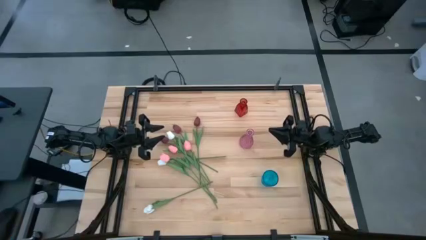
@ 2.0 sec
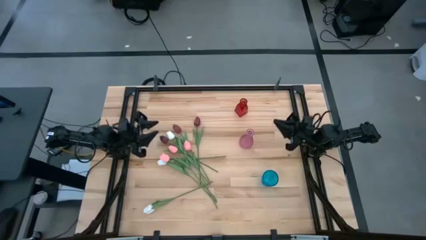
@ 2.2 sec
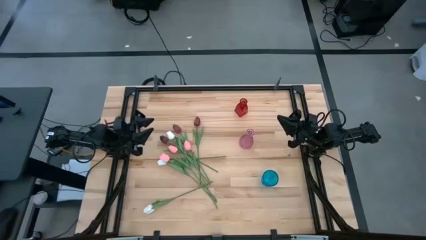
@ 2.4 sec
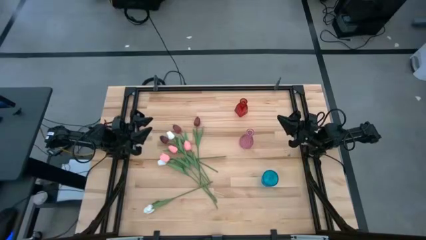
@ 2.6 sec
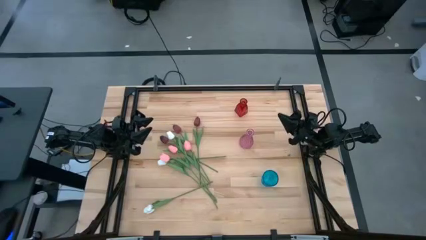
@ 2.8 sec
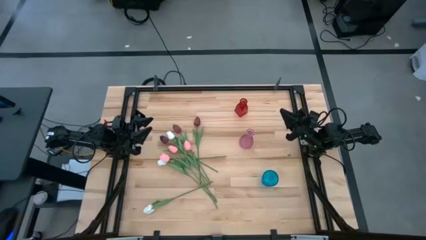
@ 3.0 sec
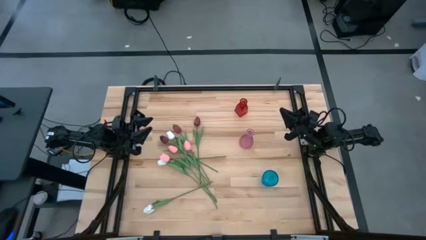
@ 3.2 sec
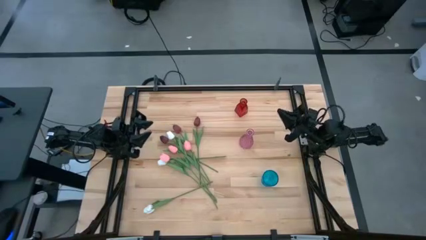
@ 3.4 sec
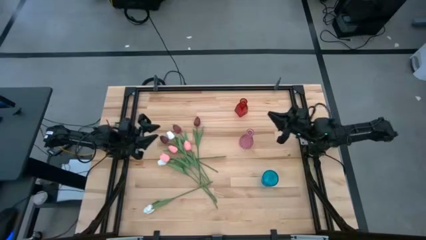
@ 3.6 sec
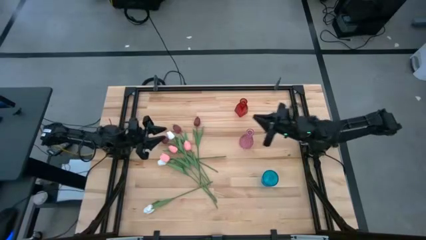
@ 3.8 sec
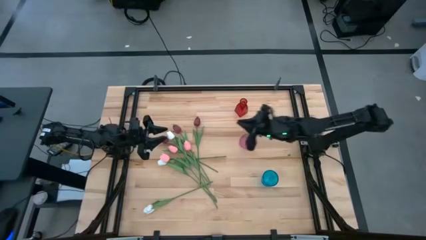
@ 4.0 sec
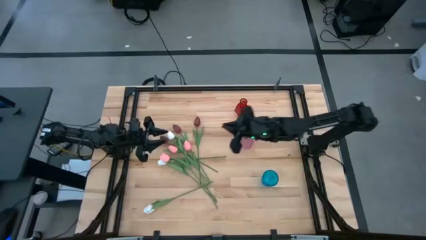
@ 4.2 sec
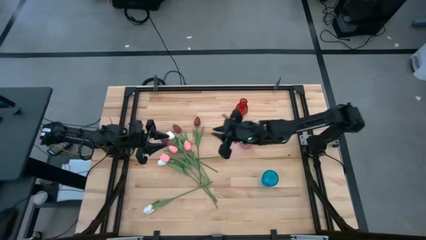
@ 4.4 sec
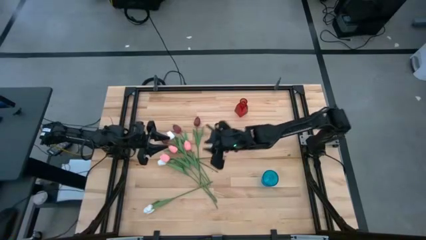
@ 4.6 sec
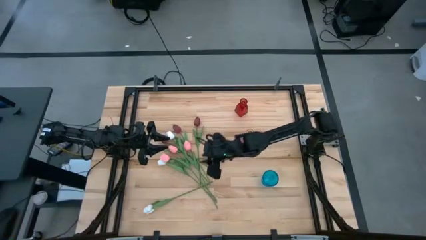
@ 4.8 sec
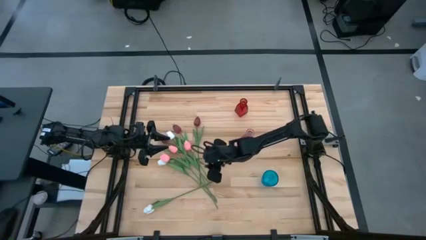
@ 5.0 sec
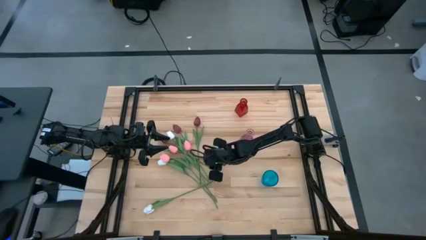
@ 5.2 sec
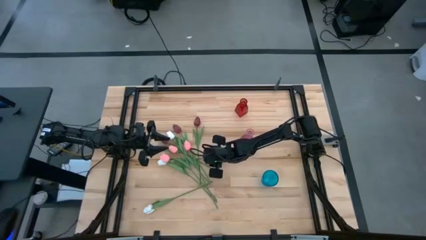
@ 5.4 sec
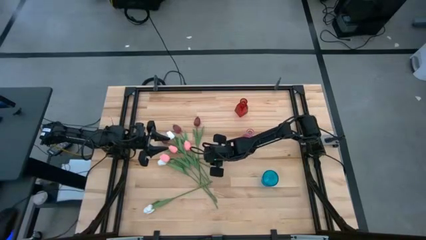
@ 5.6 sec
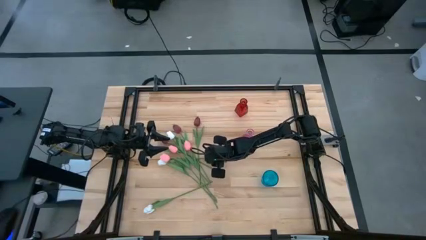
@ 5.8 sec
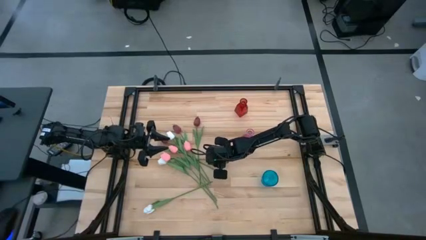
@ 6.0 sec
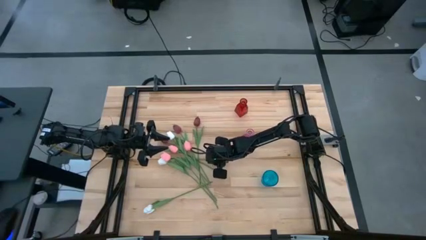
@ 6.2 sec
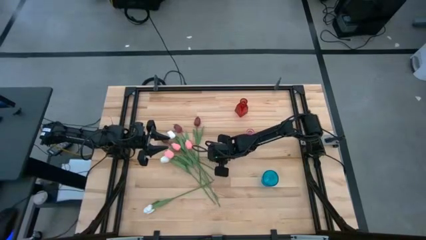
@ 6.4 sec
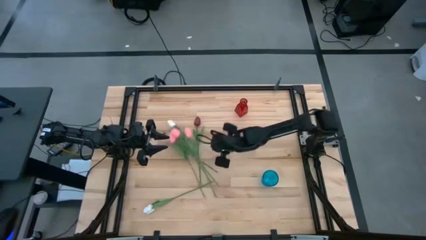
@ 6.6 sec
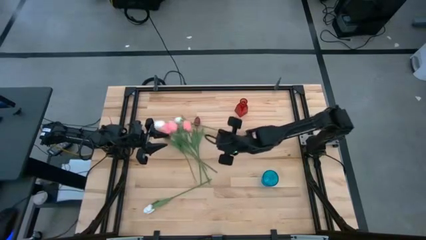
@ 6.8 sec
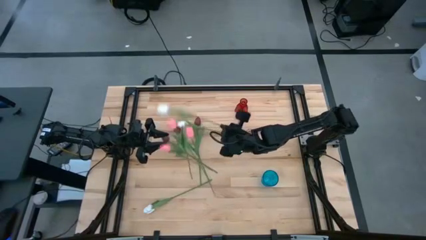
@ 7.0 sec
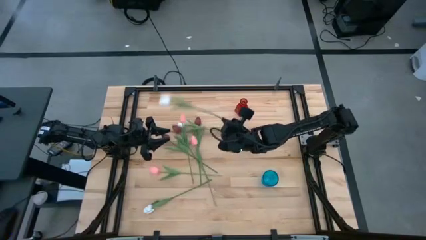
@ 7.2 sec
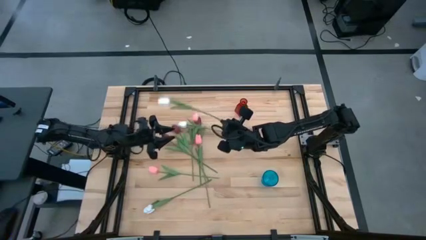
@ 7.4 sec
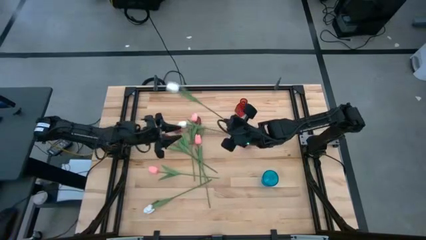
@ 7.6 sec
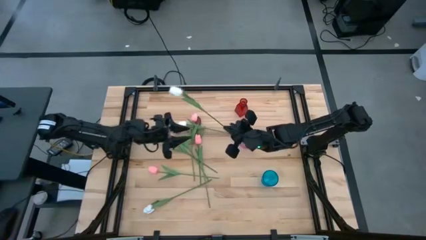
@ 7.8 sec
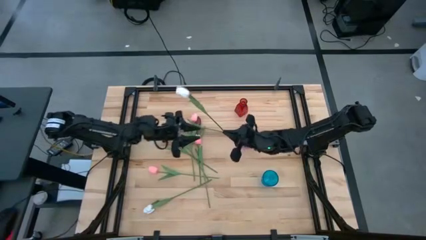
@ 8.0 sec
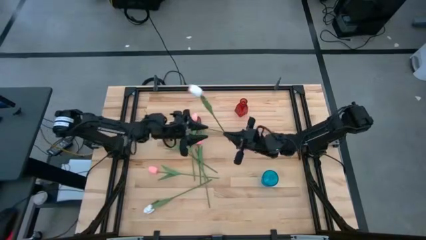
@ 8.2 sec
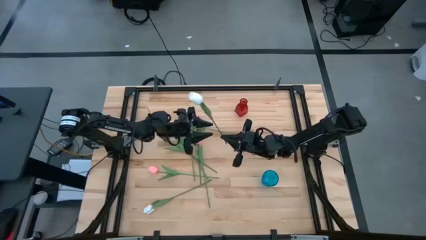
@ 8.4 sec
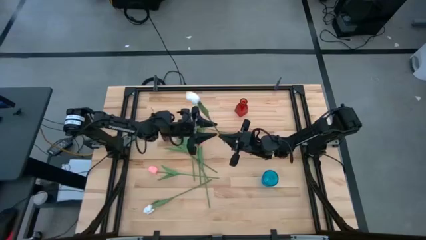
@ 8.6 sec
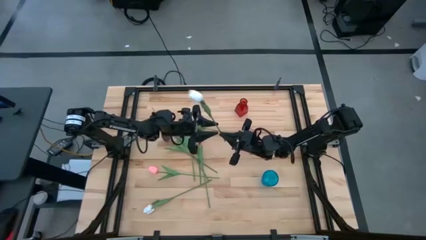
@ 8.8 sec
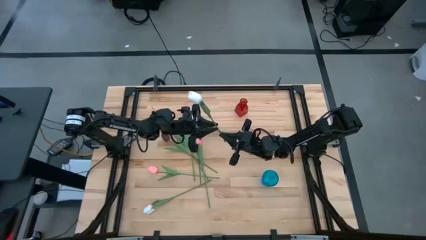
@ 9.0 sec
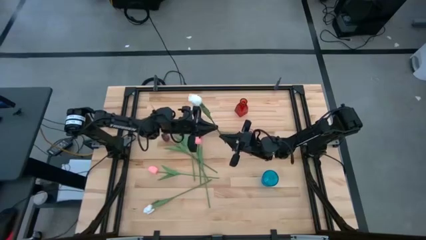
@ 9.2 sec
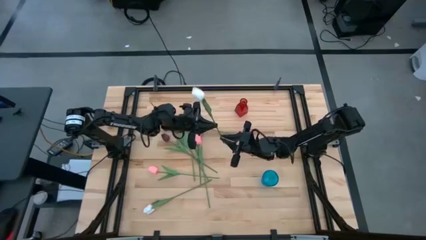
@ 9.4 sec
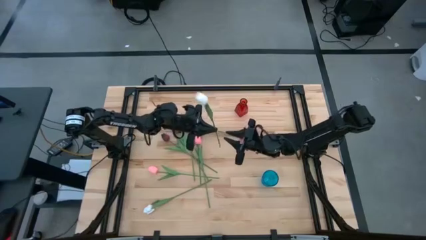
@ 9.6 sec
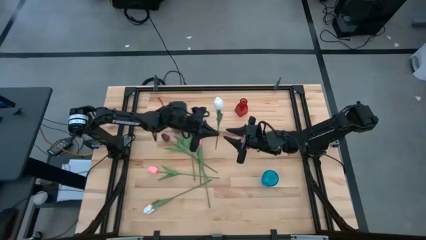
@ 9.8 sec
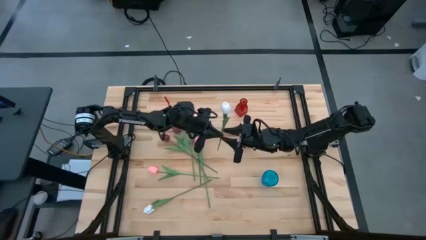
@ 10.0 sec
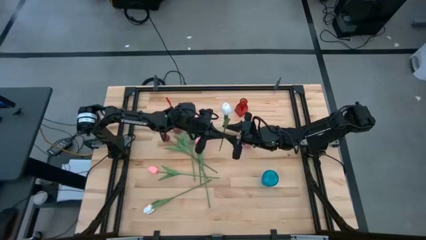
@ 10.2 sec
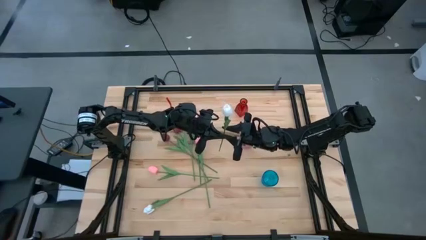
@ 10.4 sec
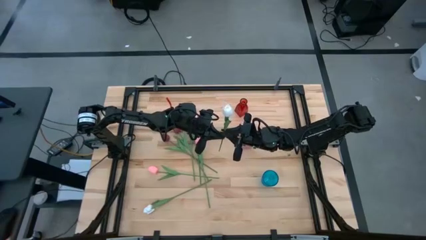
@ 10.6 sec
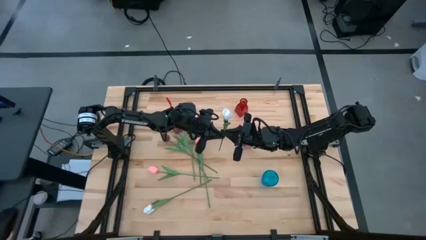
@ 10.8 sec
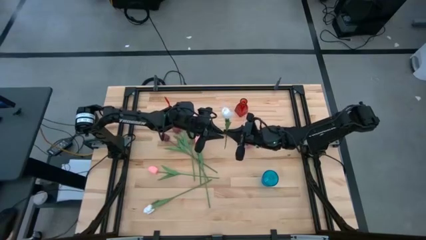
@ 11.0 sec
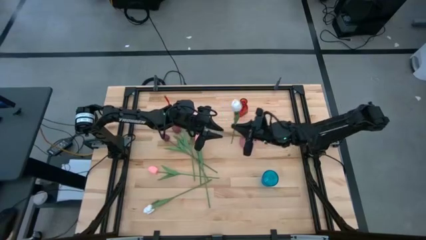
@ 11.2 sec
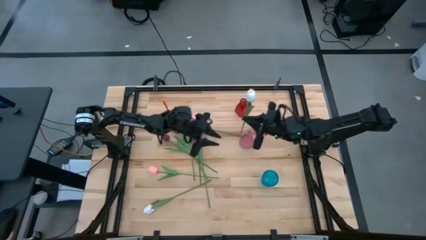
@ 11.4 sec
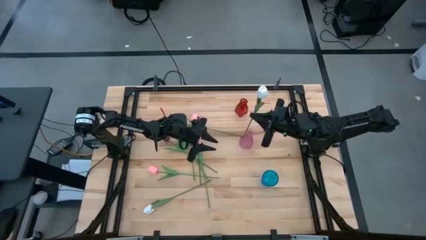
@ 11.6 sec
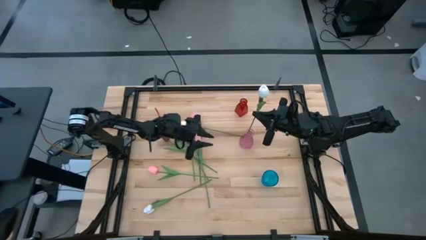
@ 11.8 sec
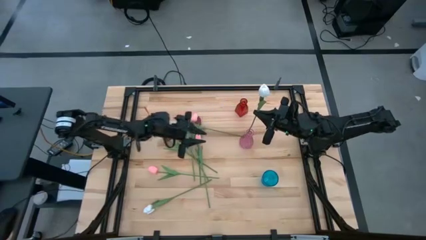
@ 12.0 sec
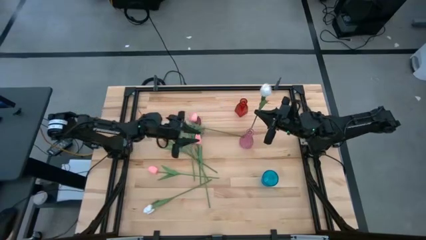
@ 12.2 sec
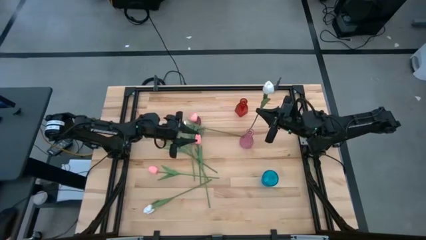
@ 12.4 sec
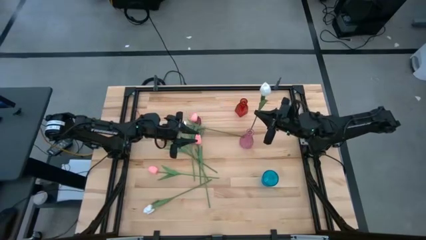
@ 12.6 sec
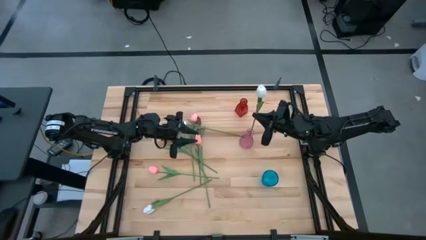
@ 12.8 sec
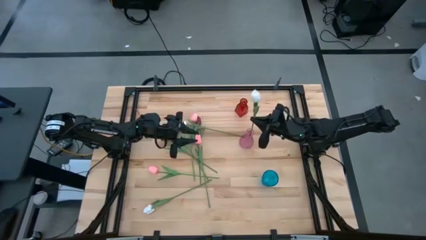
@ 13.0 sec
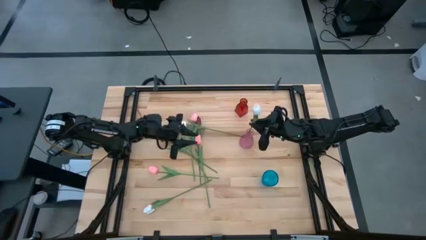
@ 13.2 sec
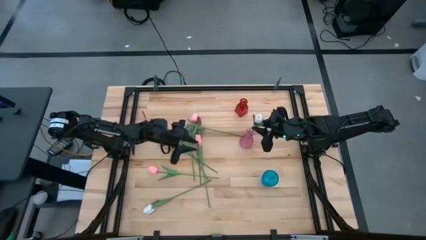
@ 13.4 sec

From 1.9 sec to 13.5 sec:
Task: Sort flowers into vase by color
Put the center white tulip into the pink vase

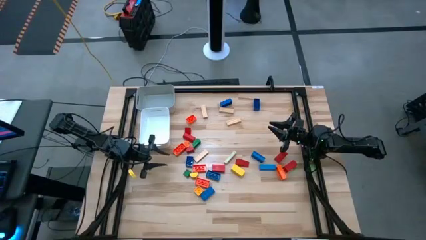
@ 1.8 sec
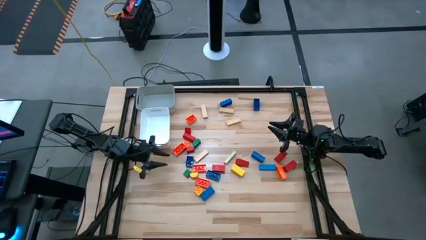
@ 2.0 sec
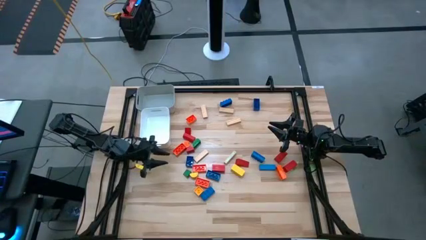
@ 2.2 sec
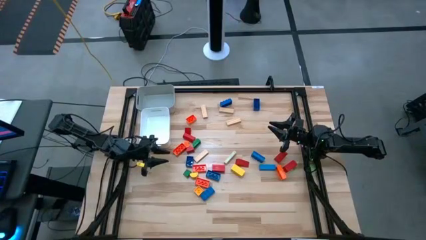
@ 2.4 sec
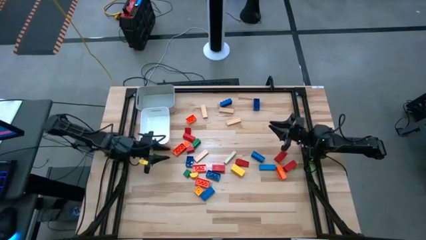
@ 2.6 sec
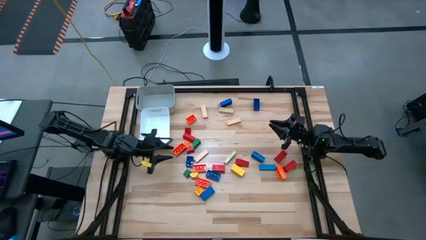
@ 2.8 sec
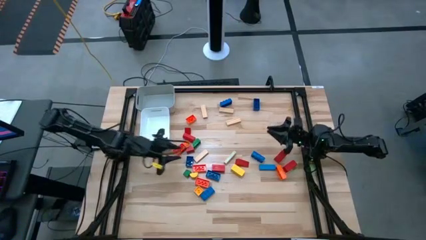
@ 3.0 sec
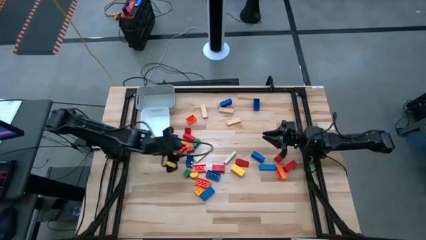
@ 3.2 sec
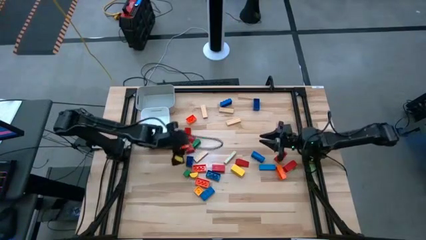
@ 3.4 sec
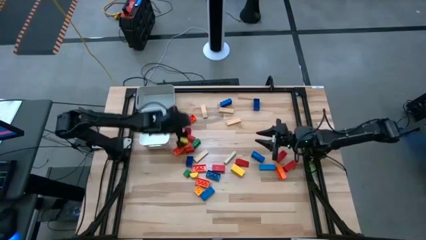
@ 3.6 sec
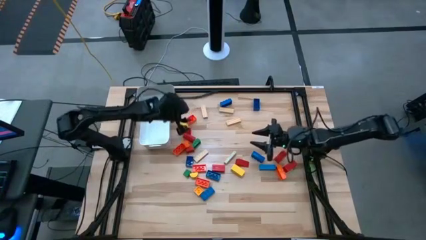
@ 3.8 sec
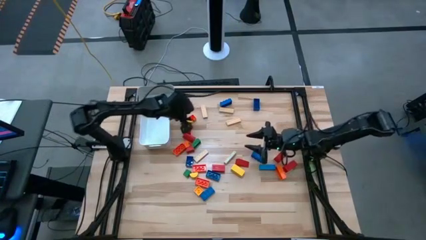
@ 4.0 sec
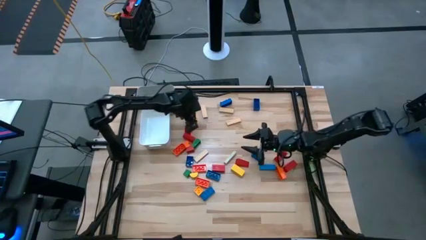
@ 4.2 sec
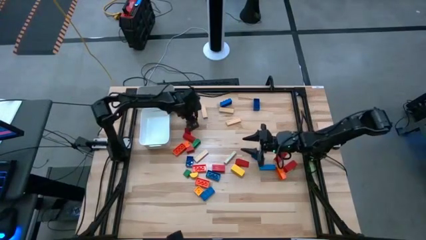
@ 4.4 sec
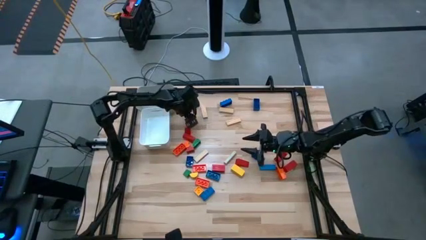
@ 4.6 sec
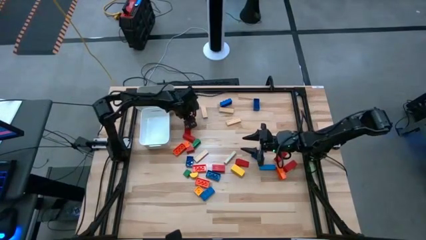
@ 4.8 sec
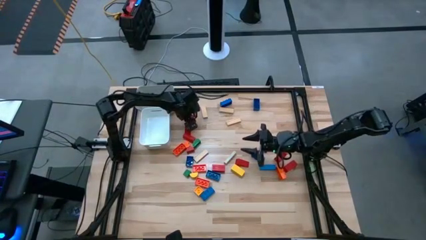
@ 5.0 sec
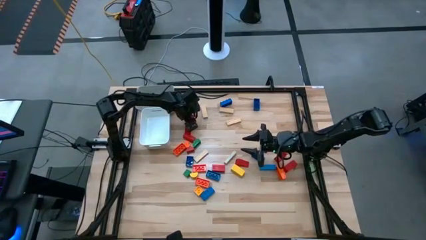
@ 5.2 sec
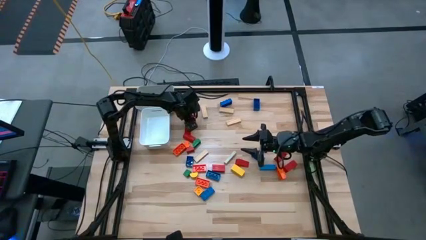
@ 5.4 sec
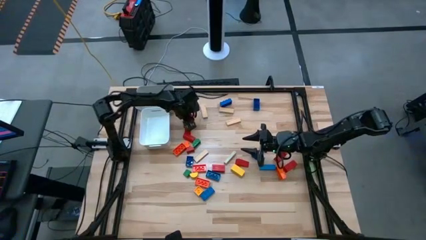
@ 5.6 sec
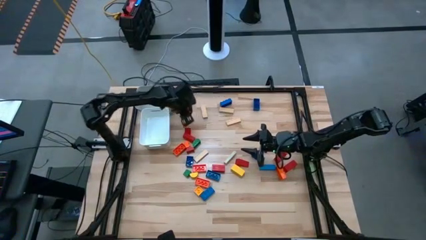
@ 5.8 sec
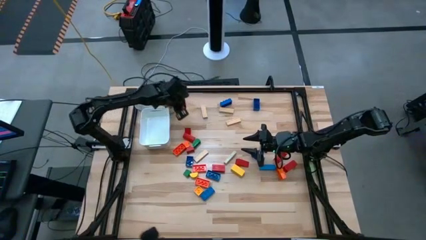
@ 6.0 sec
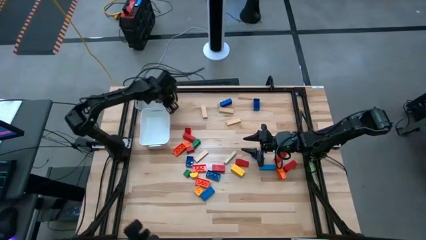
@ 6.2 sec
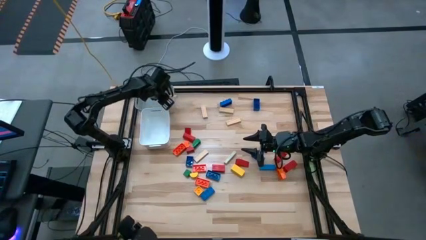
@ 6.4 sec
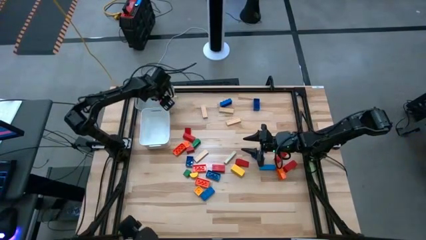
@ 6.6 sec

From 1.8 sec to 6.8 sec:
Task: Sort blocks by size
Put the small orange game piece into the gray bin
